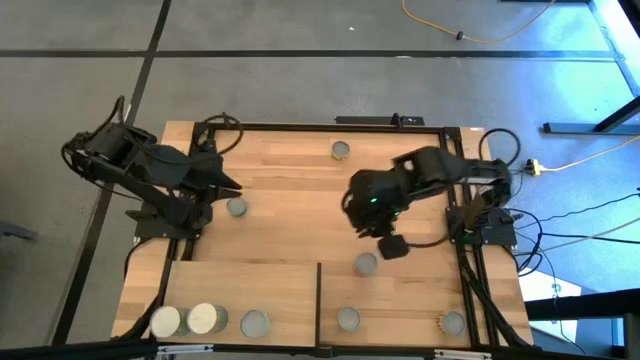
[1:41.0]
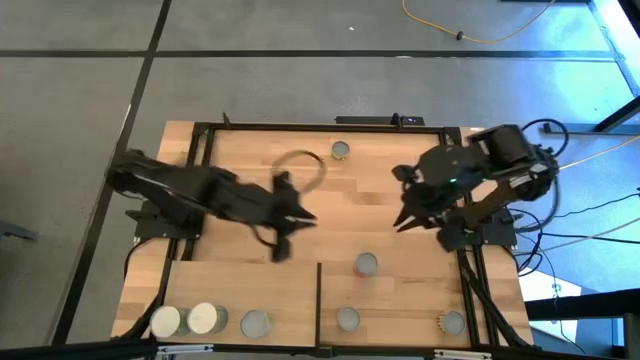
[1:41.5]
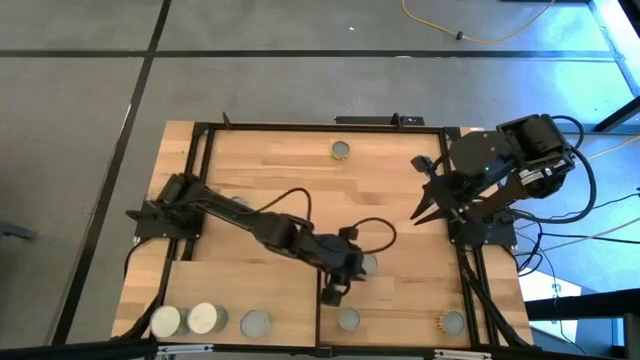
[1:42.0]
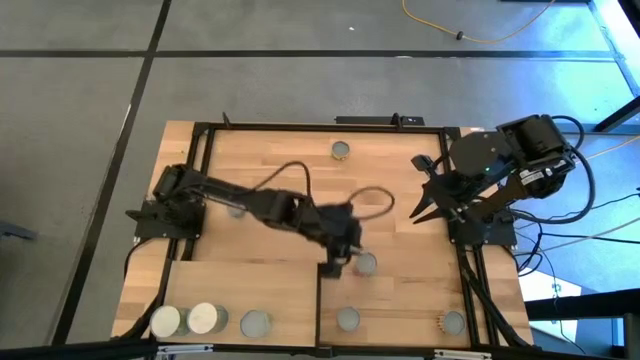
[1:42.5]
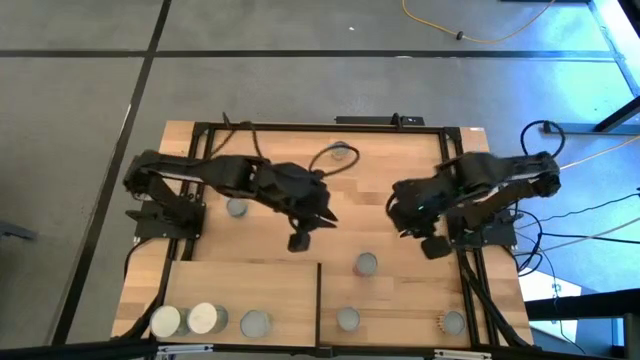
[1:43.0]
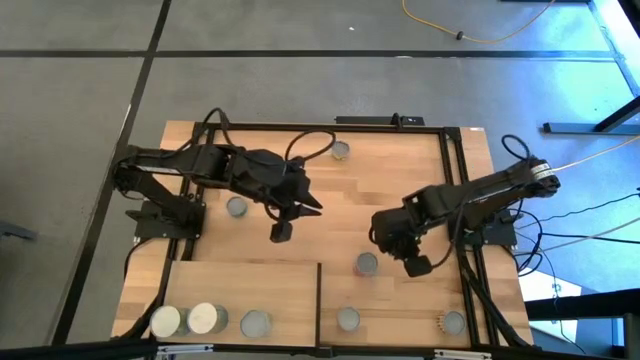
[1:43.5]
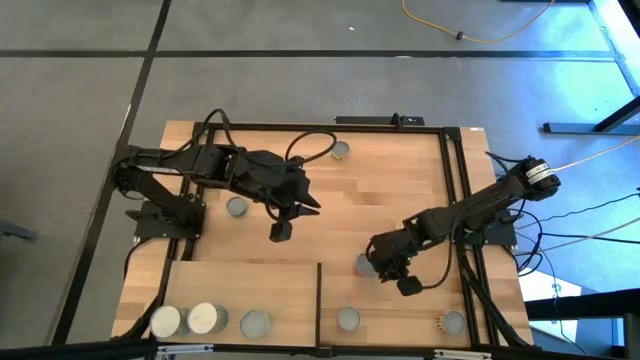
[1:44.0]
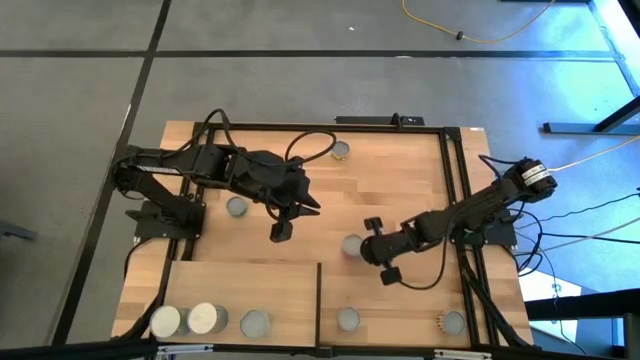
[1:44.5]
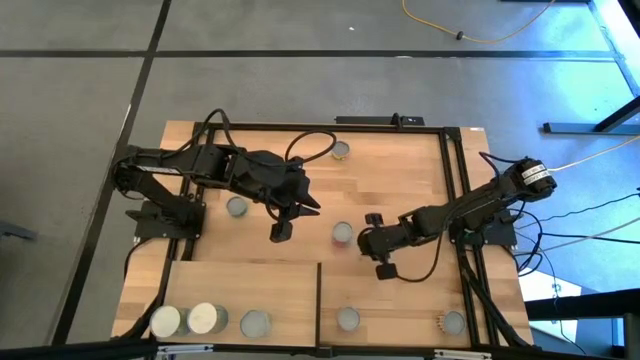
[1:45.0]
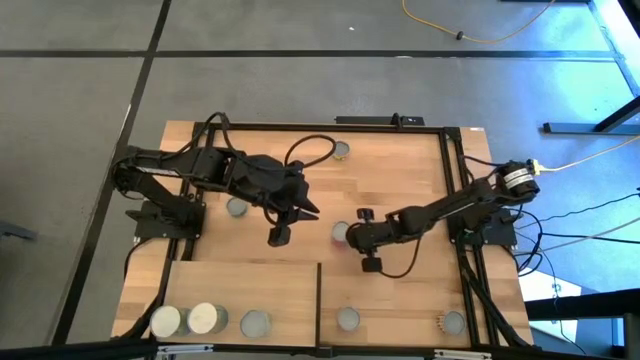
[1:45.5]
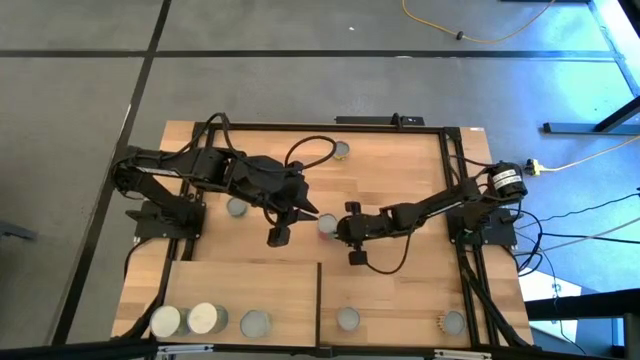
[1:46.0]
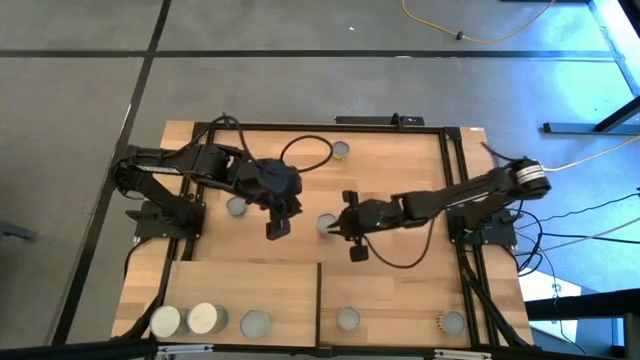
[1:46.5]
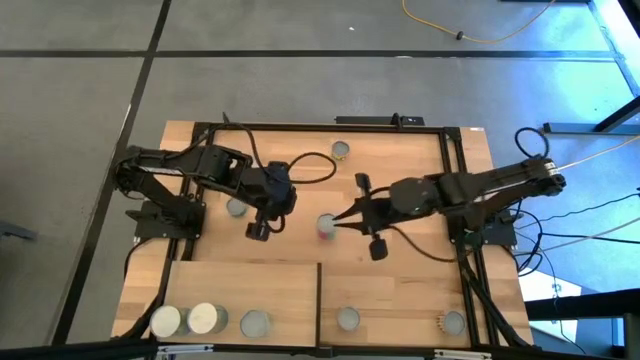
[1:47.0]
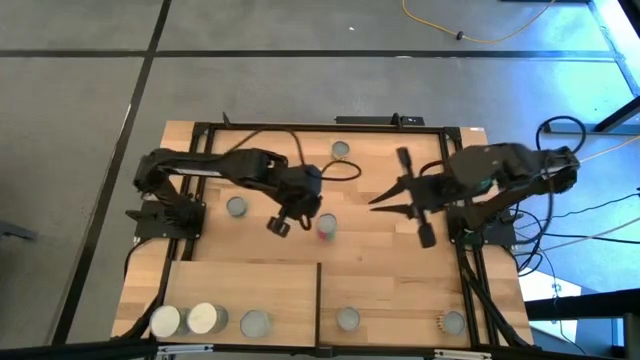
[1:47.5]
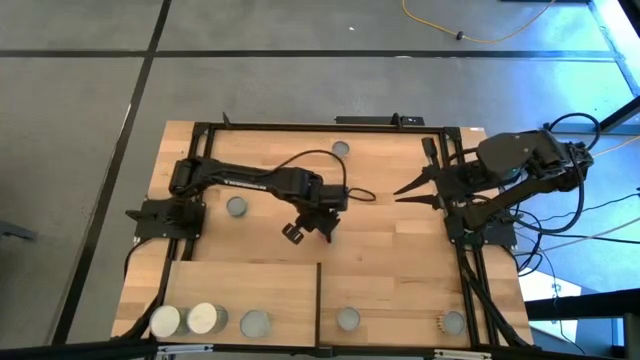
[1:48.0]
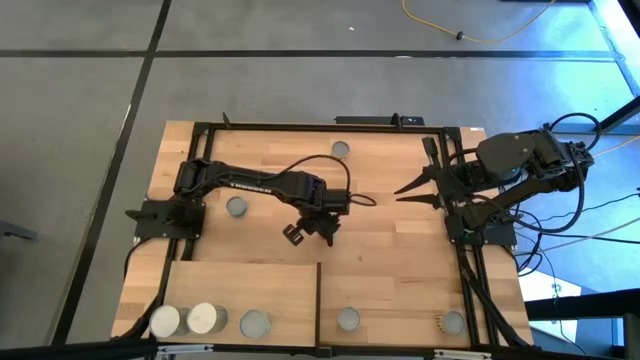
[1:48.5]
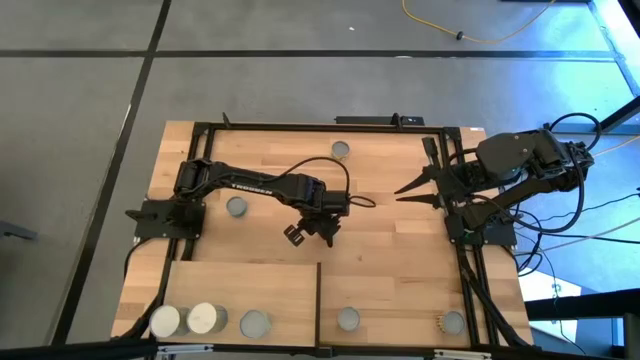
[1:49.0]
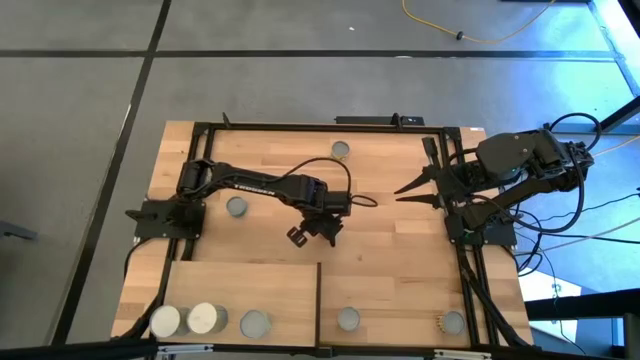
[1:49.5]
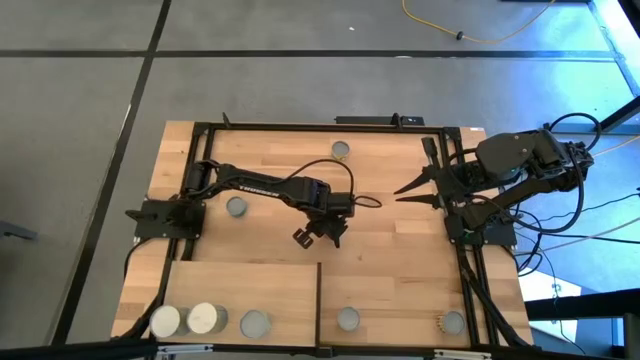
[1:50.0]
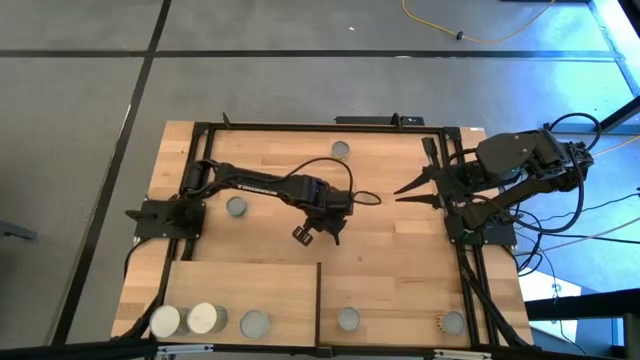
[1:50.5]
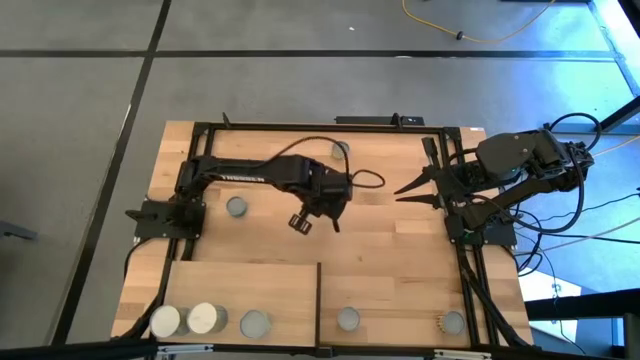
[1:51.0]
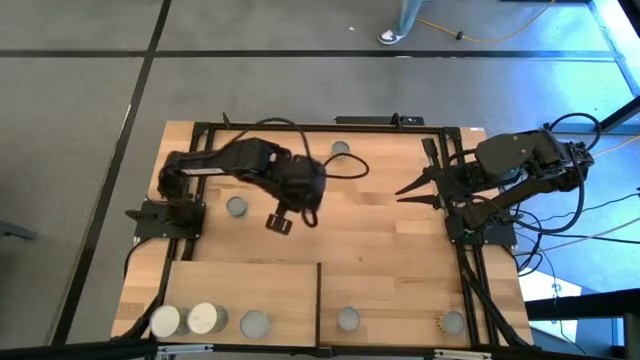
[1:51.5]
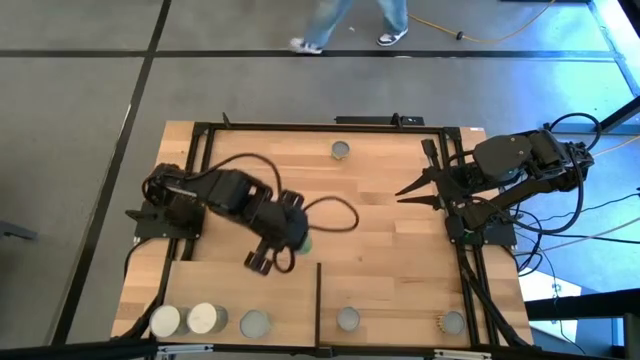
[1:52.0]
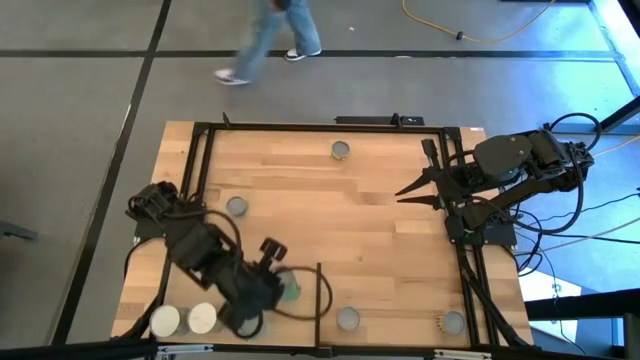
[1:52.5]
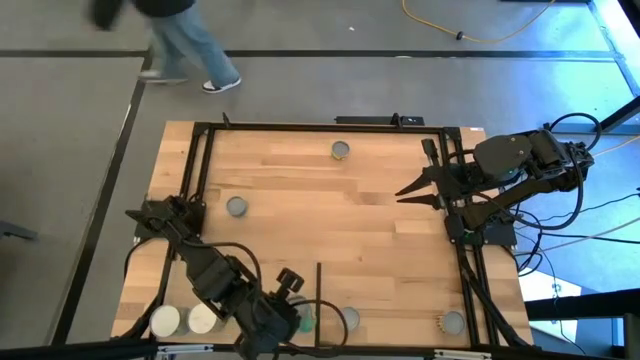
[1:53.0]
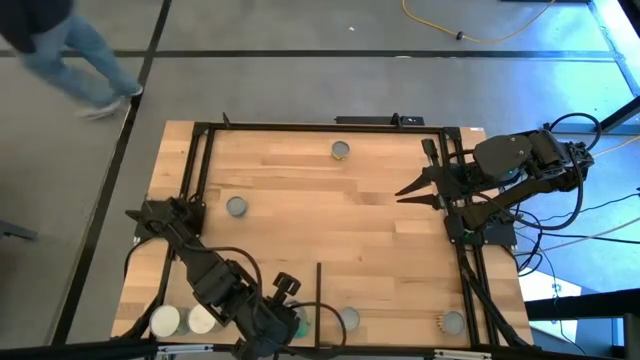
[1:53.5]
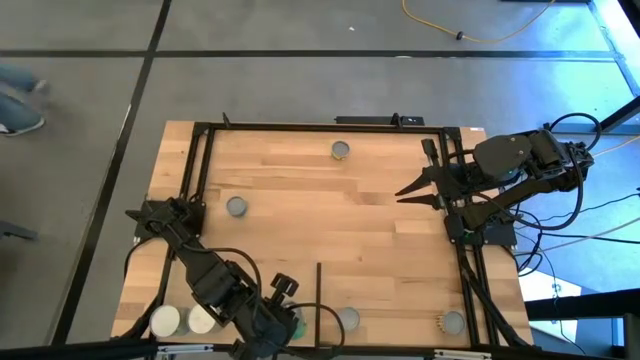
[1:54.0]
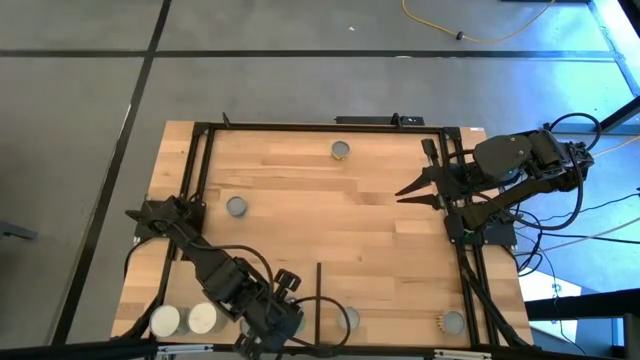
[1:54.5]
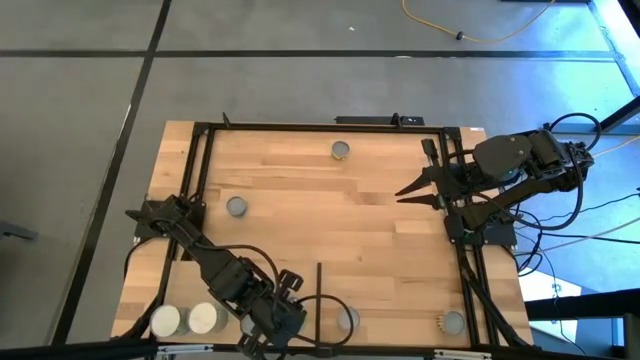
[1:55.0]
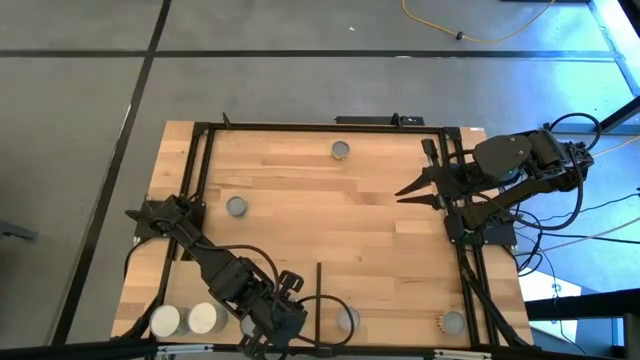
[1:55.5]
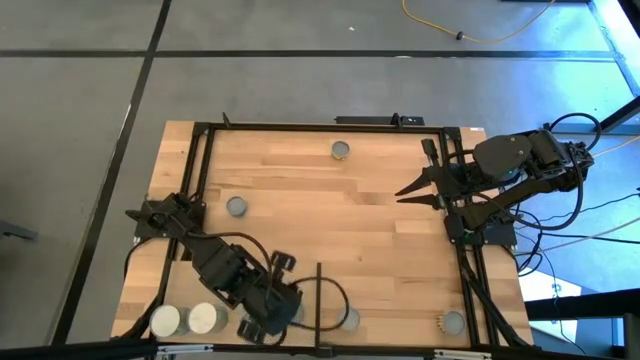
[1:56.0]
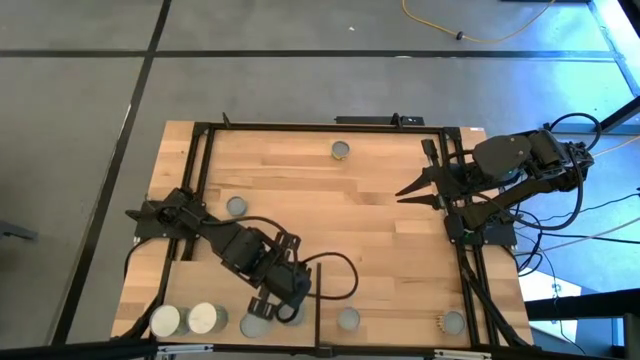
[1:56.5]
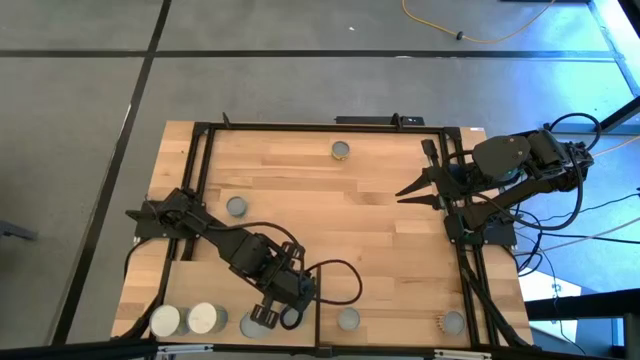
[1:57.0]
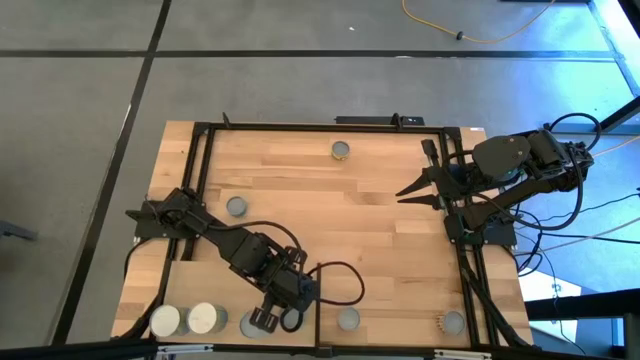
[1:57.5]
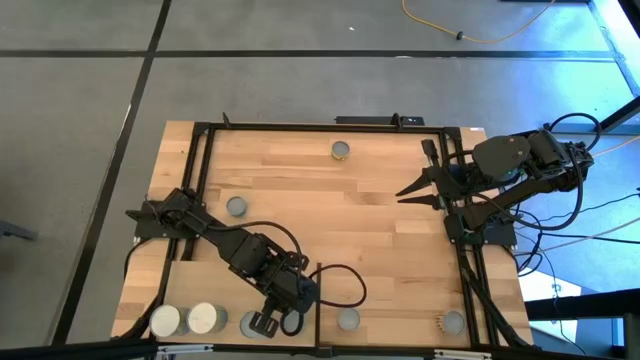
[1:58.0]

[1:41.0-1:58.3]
Task: Pick and place cans onto a shelf
Put the canned chicken soup on the shelf

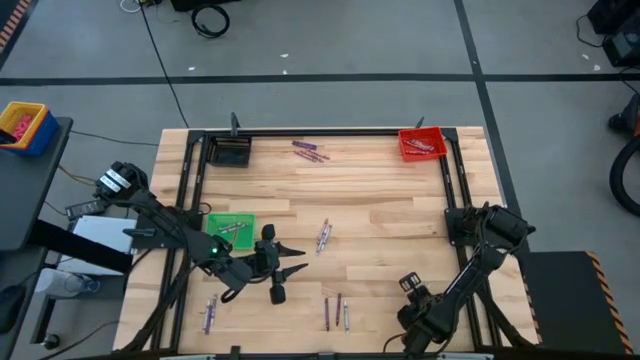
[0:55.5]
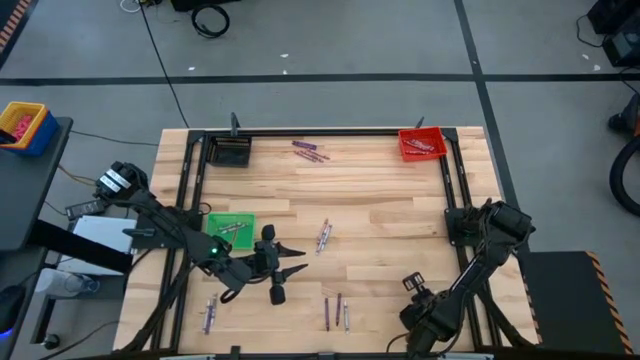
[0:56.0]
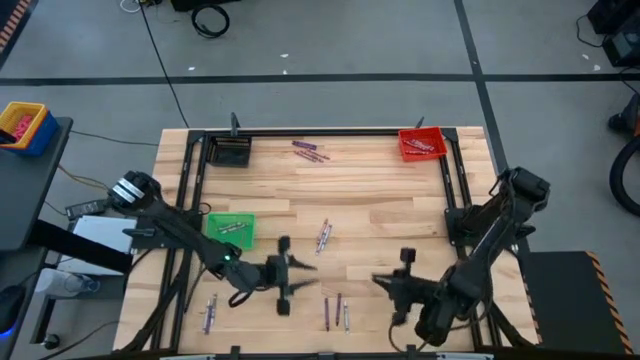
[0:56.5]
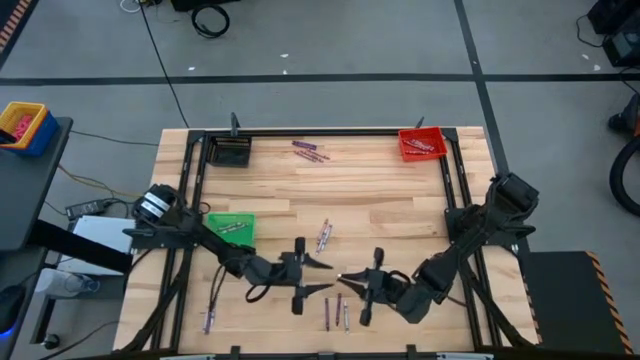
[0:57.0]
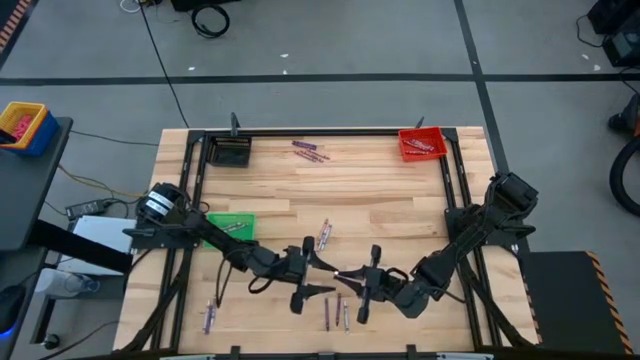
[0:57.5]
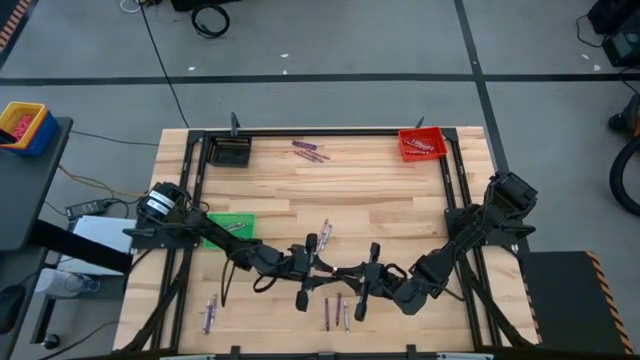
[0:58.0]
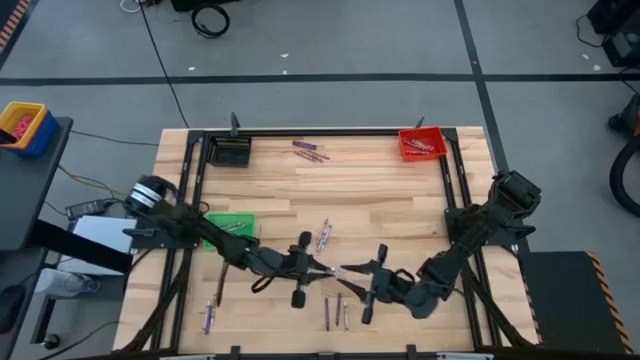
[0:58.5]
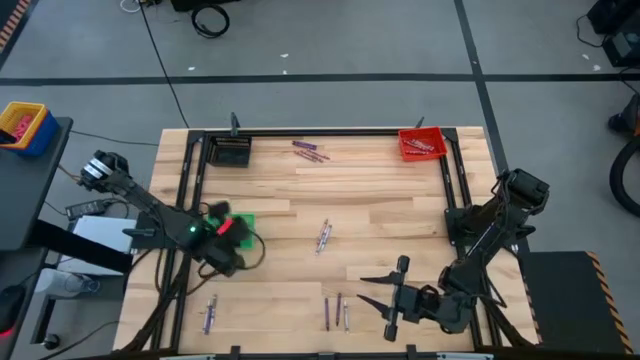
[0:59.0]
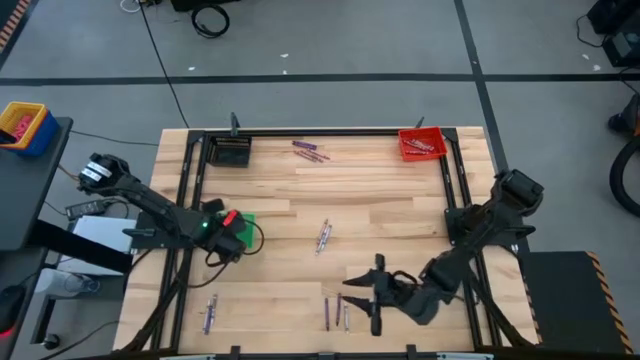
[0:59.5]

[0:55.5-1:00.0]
Task: Sort crayons
Put the white crayon into the green bin
